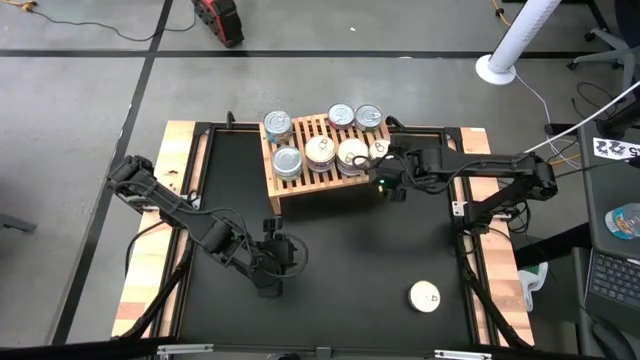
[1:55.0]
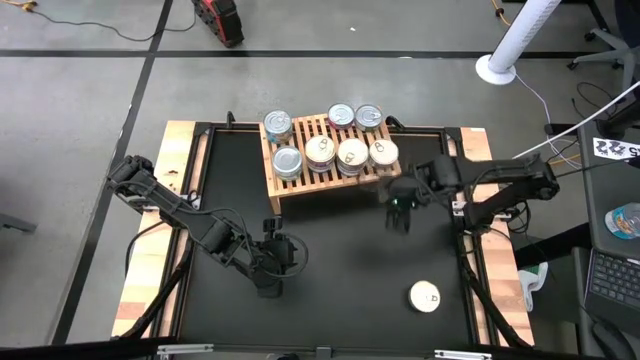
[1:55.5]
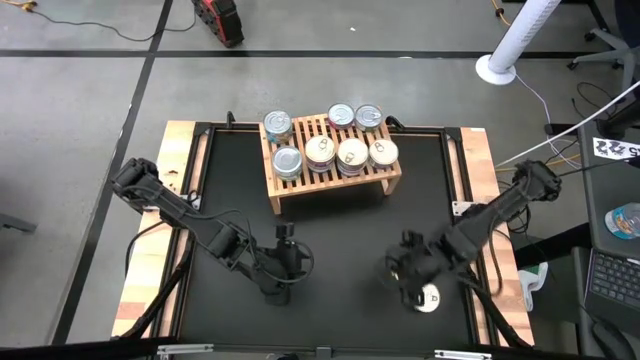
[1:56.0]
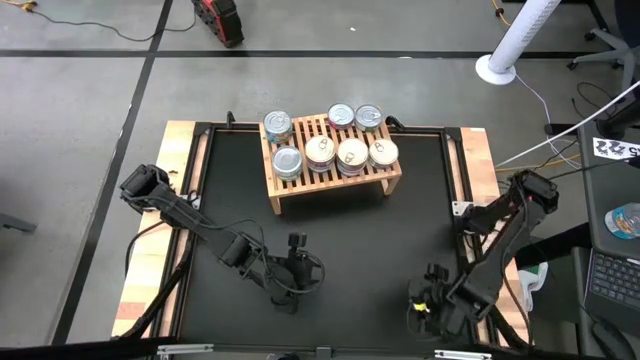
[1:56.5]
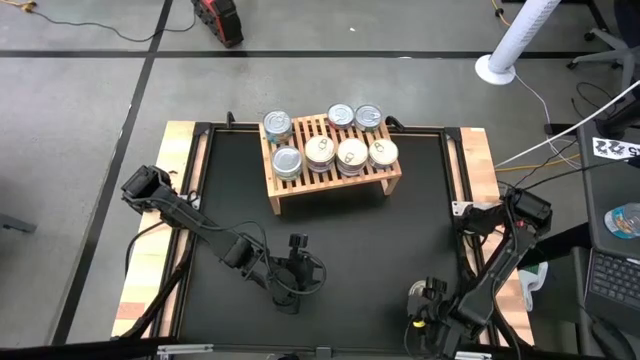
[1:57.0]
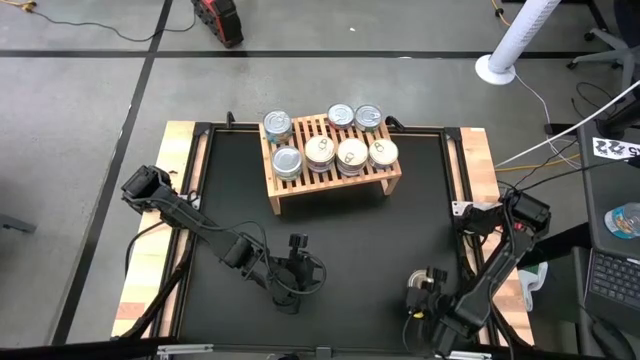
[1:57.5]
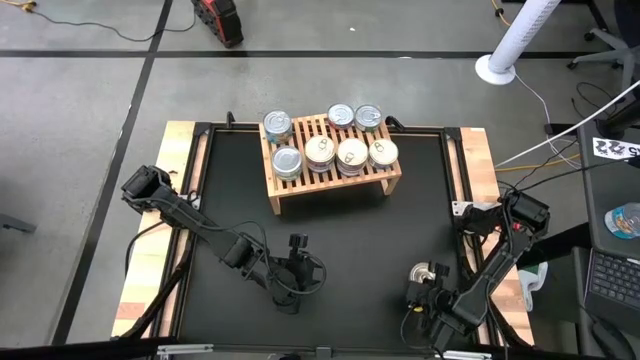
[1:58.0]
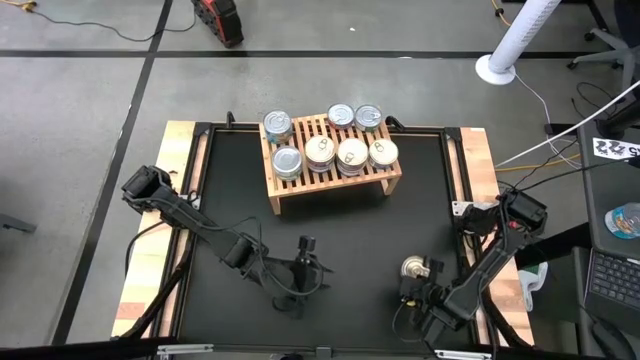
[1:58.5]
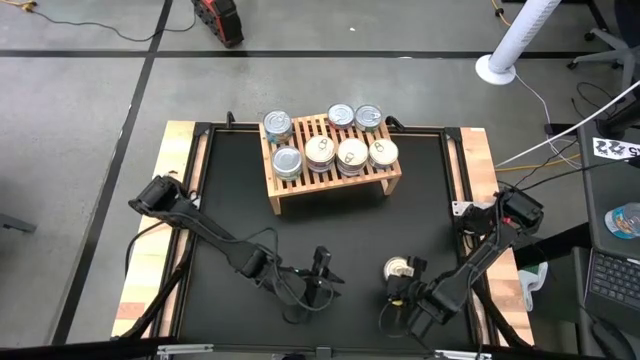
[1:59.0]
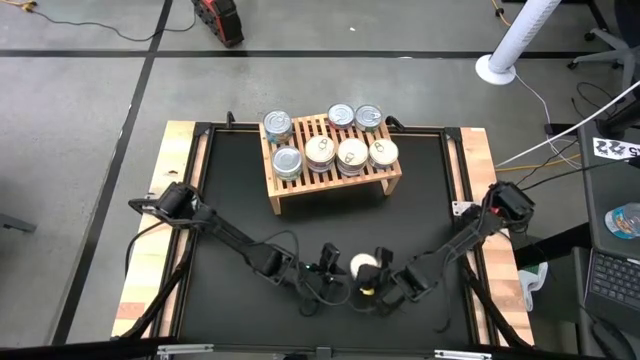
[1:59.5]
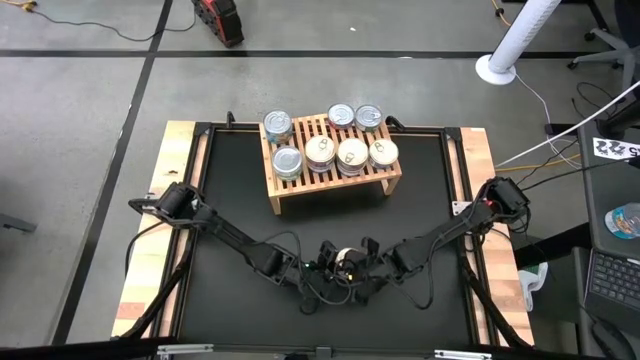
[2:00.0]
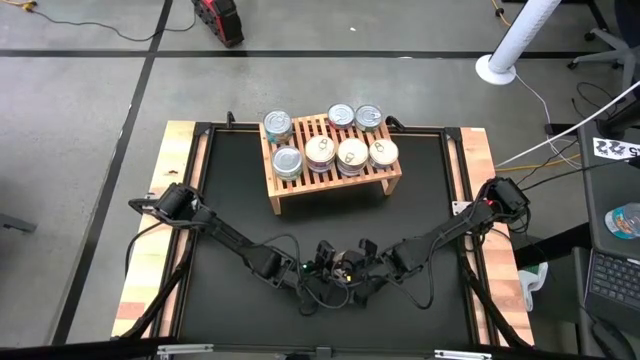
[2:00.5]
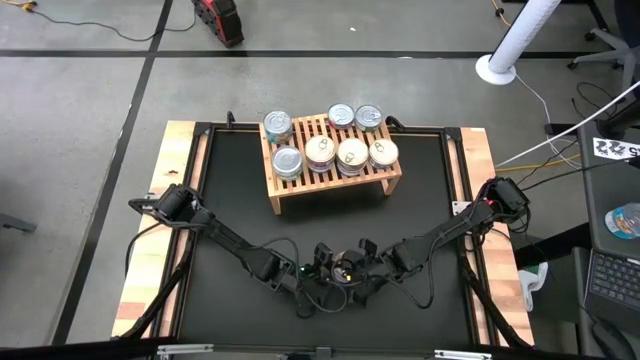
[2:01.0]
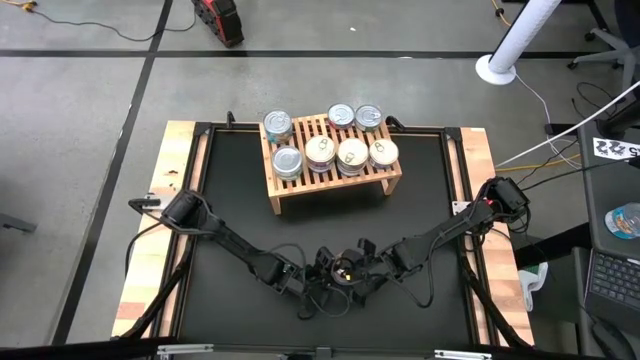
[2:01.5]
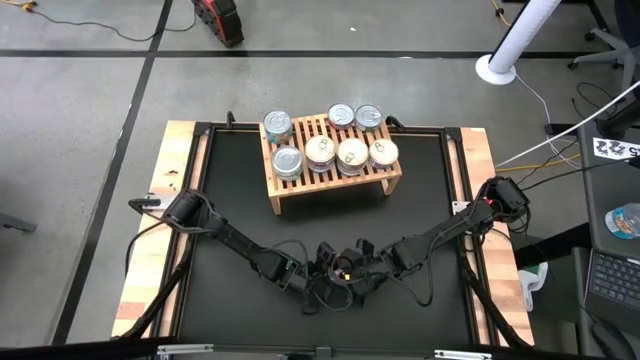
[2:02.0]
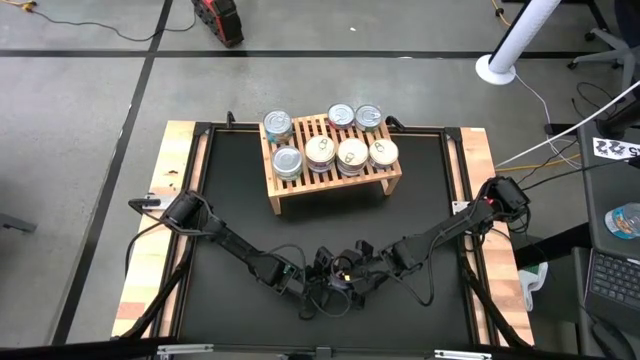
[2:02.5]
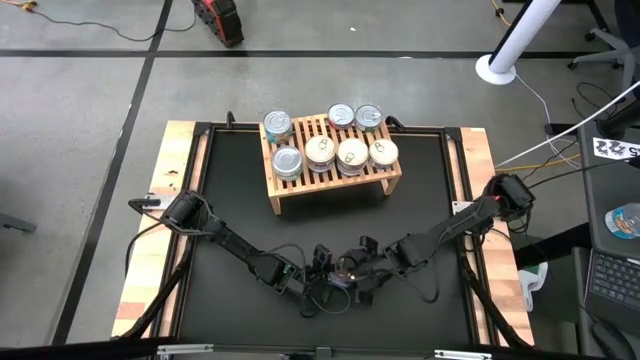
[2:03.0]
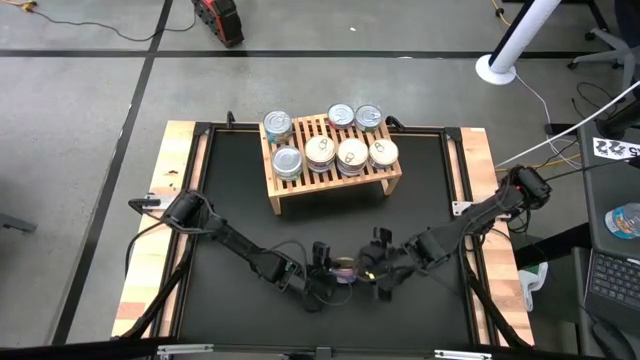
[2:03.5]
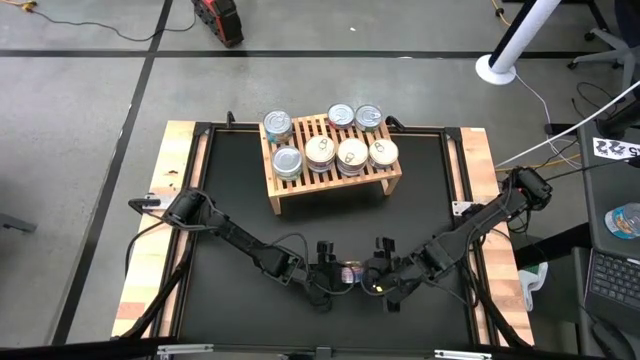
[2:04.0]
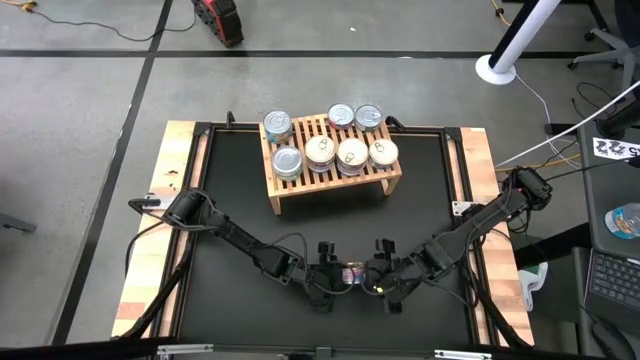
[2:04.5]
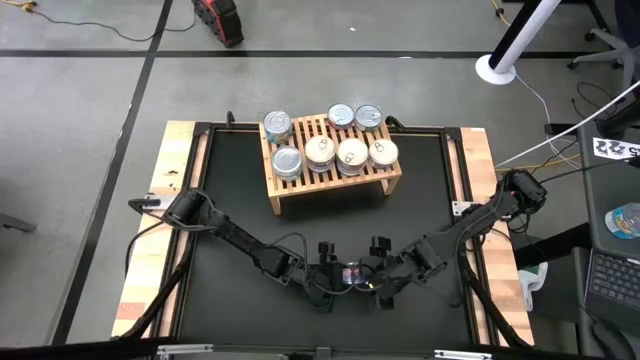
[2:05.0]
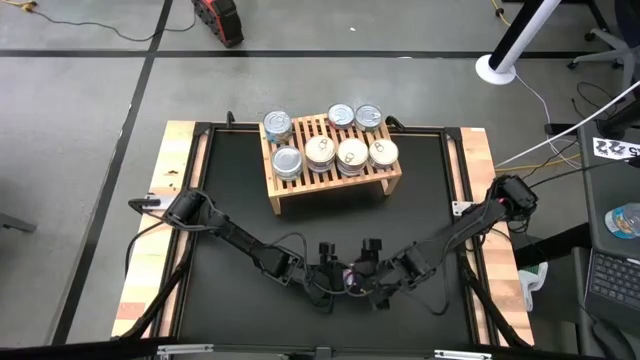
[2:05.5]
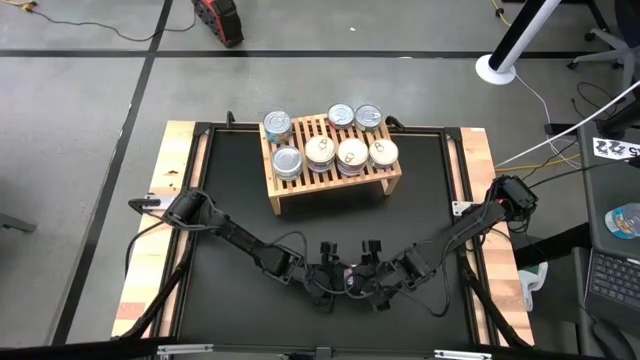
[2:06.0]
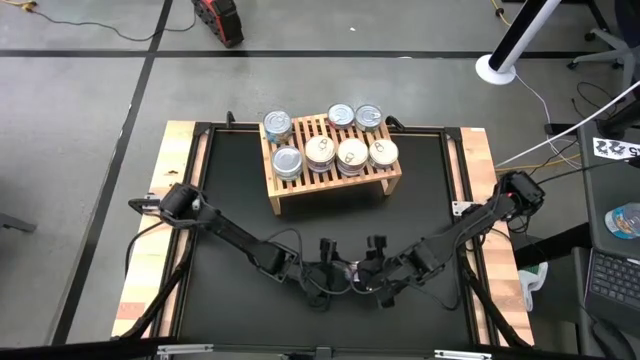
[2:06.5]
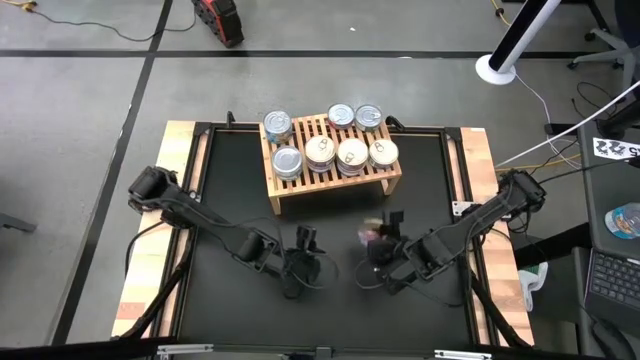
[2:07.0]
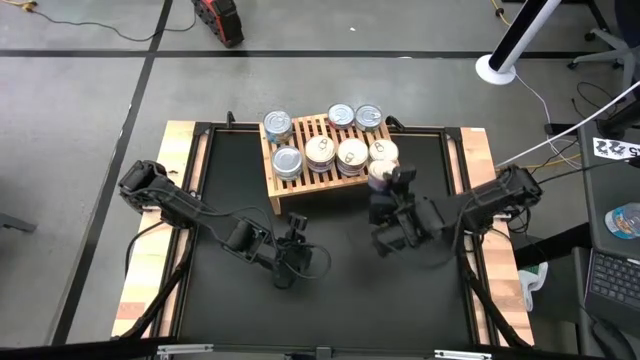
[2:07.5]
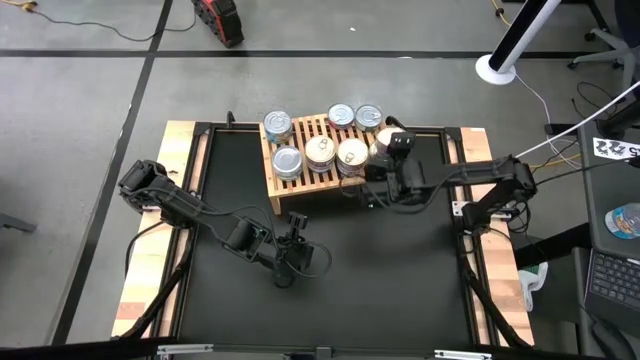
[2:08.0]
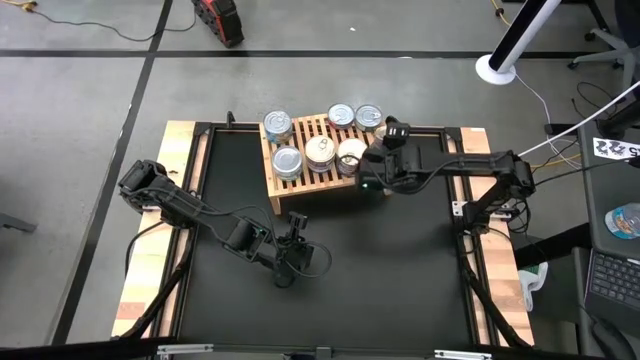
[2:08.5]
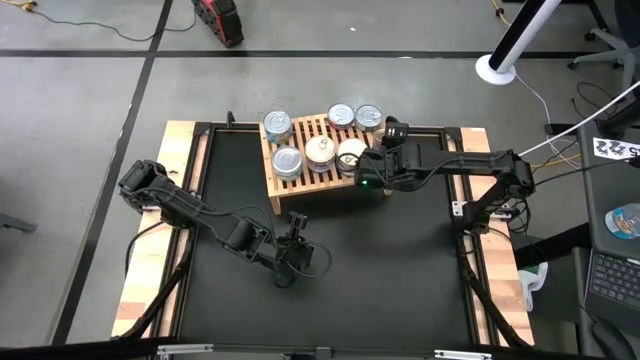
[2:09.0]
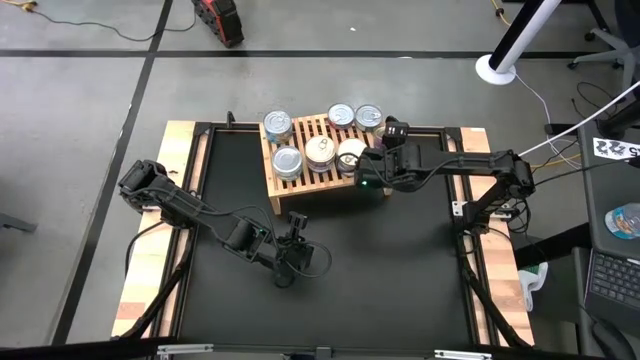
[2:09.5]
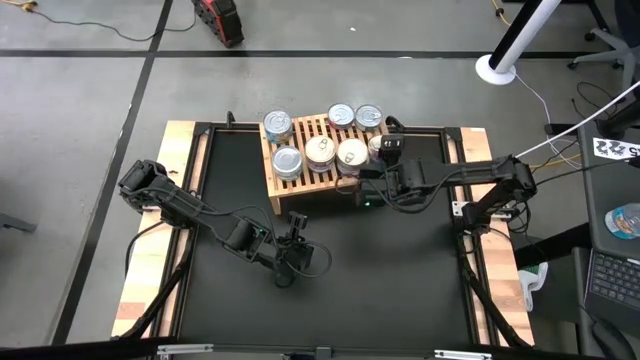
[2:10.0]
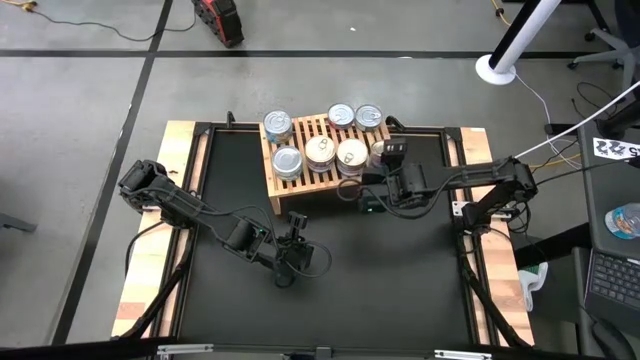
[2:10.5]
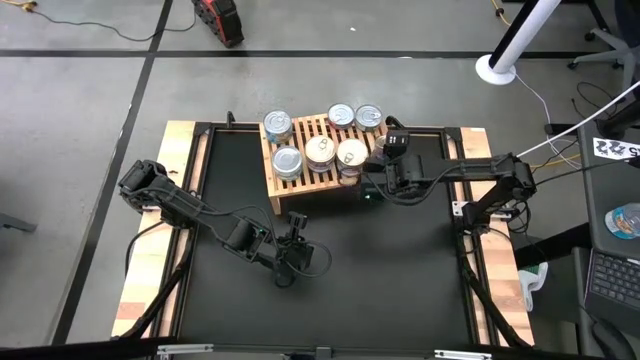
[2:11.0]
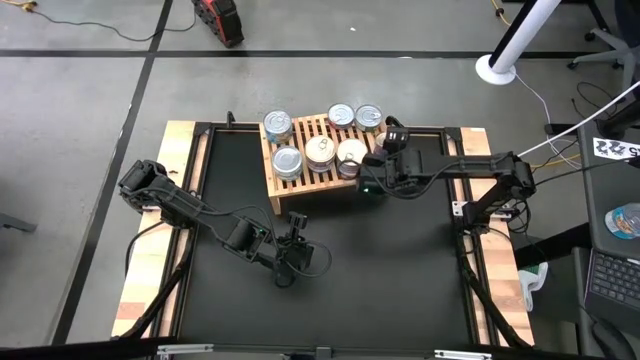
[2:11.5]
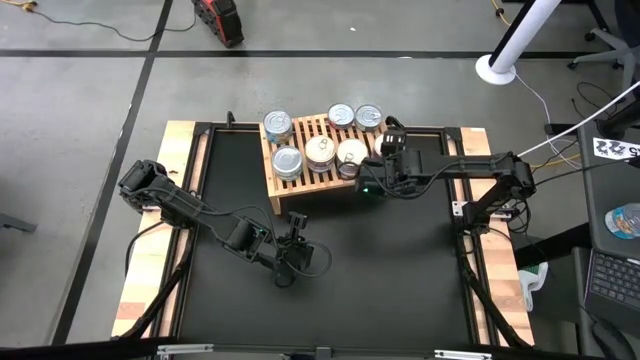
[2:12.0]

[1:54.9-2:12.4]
Task: Stack canned seafood by type on shelf
Put the blue tuna can on the shelf

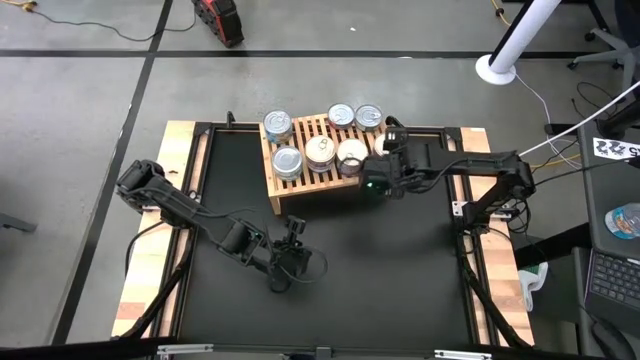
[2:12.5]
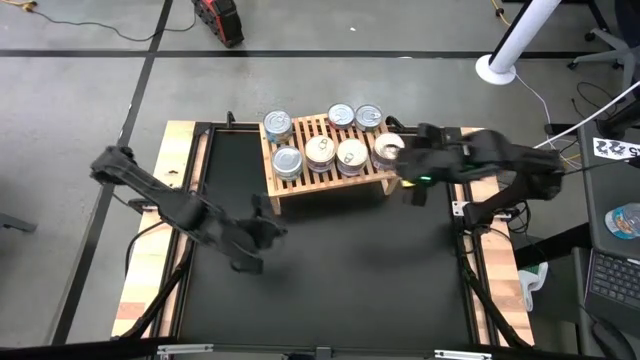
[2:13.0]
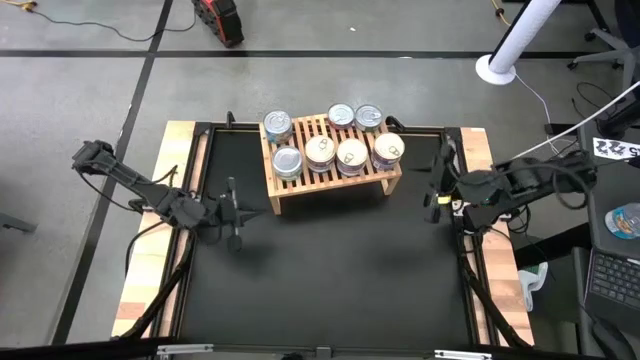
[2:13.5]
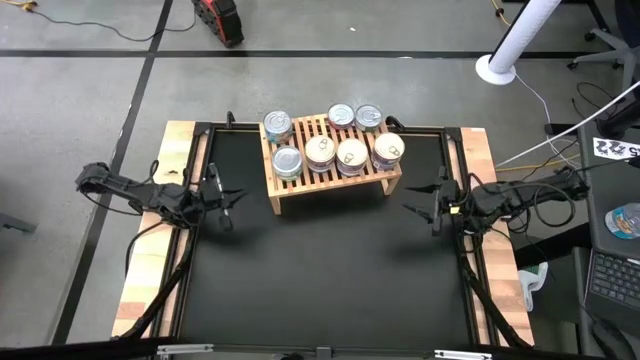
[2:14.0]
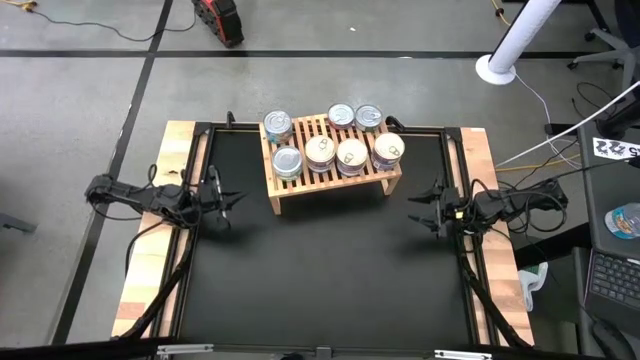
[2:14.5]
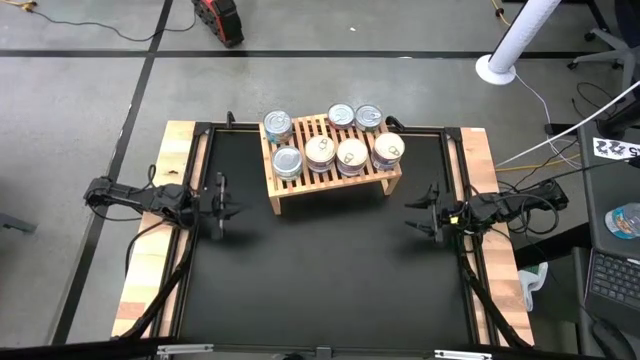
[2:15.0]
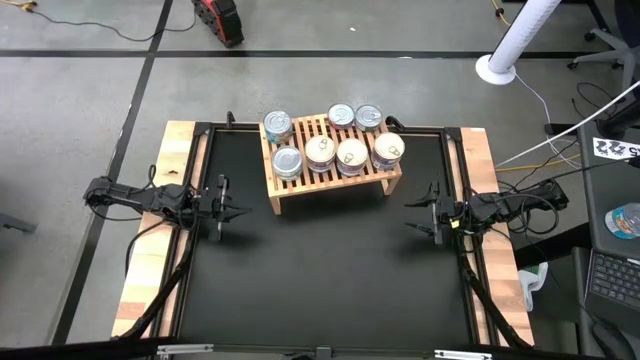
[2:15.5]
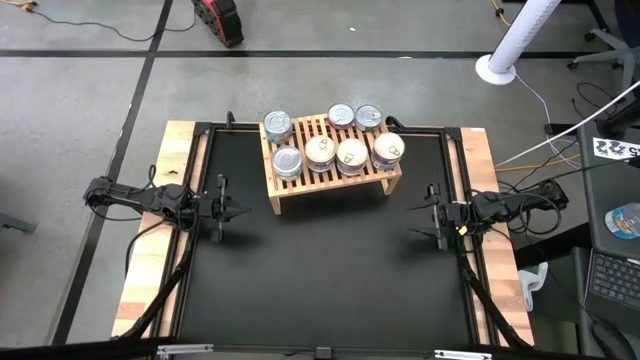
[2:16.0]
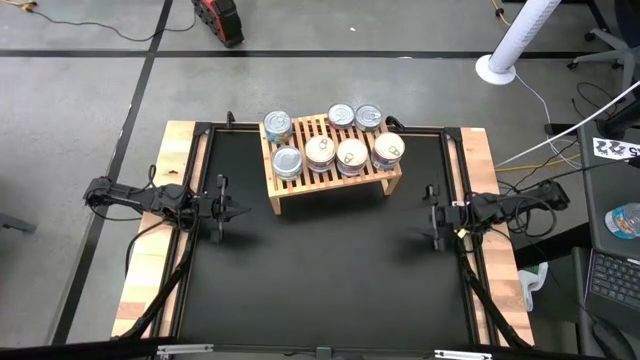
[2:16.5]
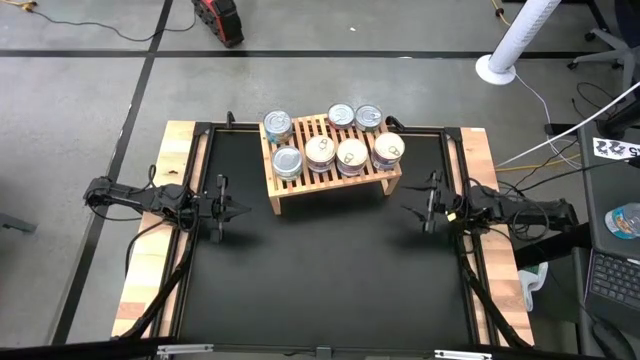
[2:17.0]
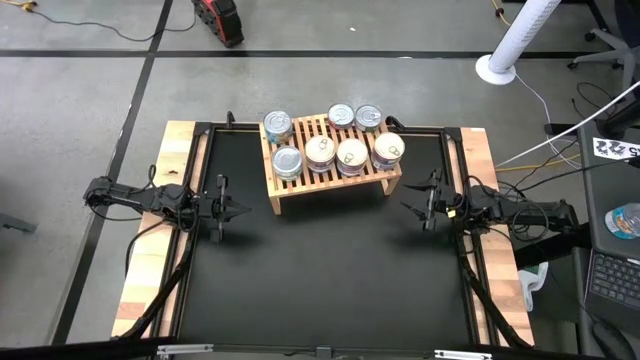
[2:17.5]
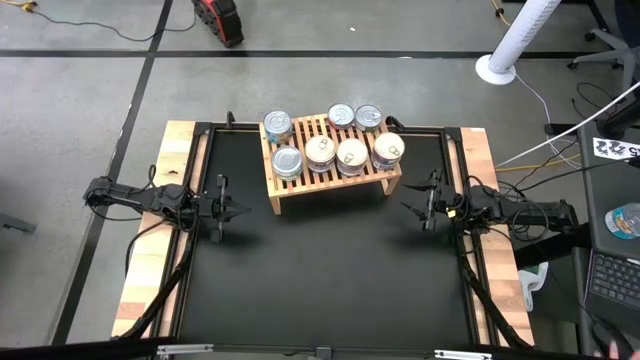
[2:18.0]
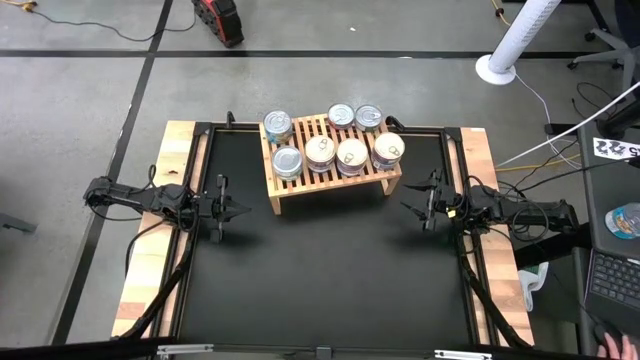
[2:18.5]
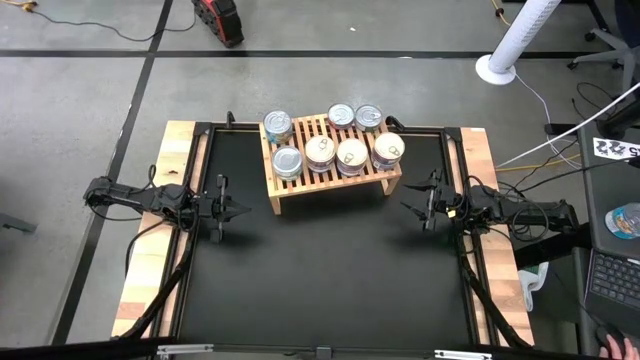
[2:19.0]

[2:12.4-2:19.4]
Return to Home Position
